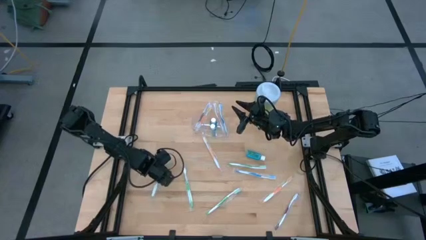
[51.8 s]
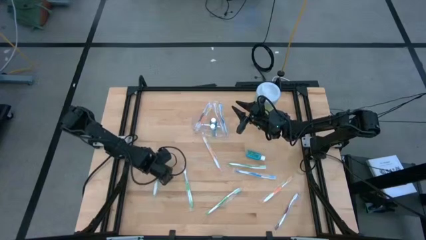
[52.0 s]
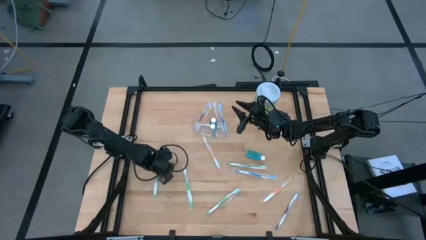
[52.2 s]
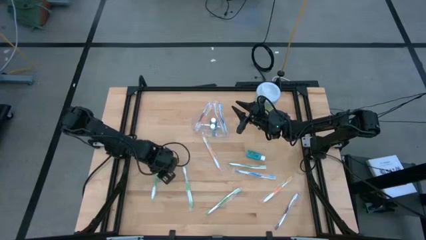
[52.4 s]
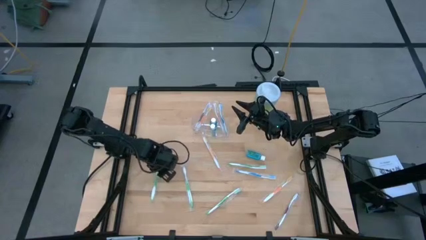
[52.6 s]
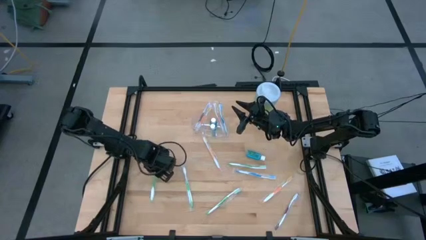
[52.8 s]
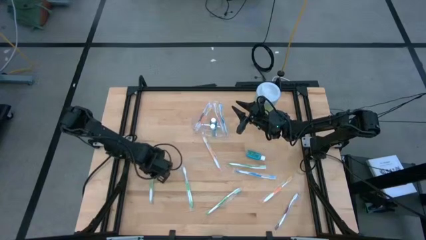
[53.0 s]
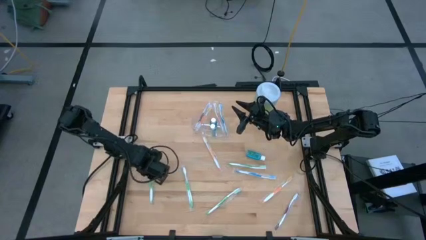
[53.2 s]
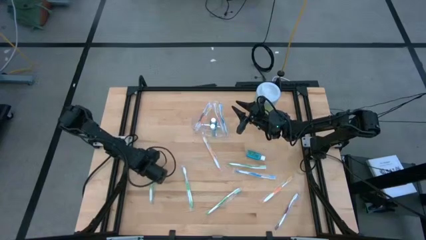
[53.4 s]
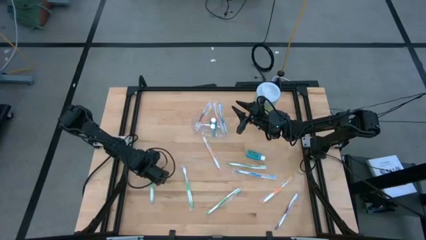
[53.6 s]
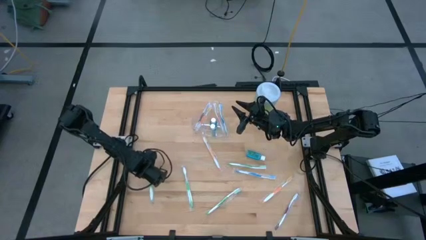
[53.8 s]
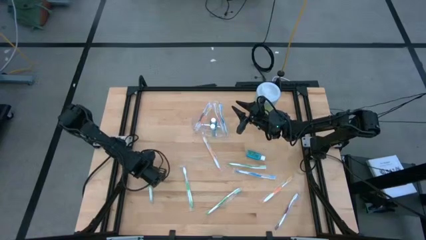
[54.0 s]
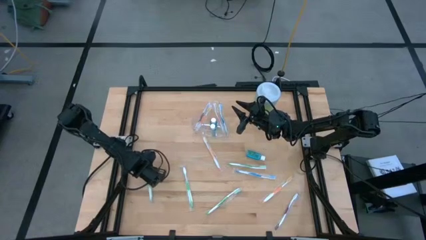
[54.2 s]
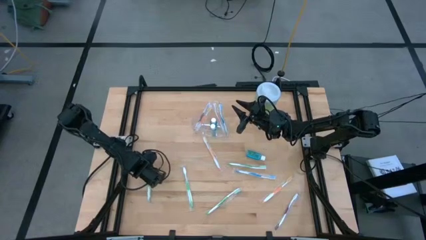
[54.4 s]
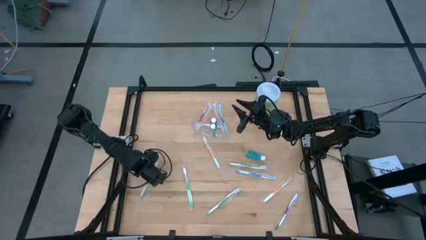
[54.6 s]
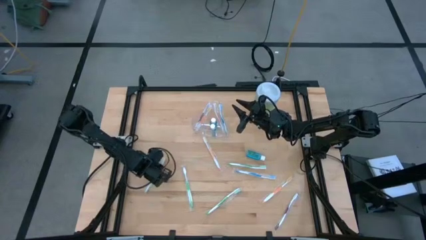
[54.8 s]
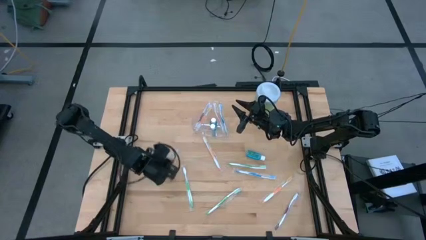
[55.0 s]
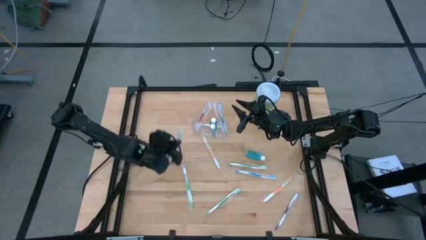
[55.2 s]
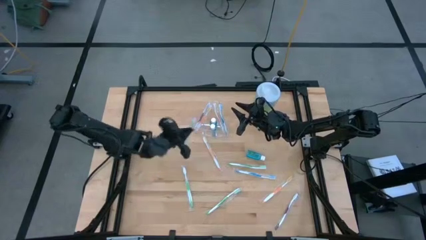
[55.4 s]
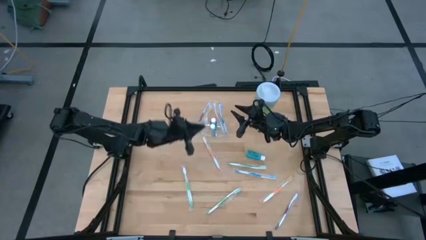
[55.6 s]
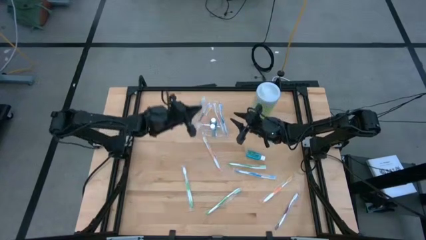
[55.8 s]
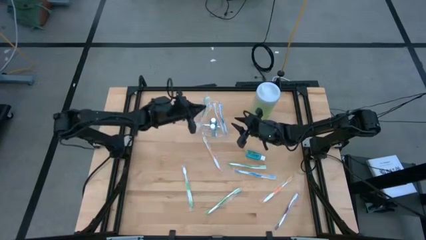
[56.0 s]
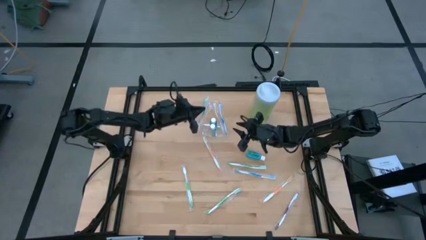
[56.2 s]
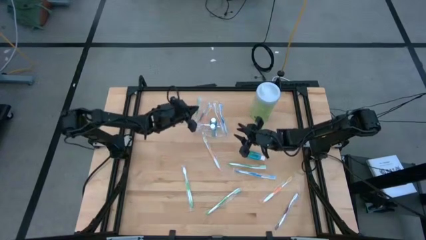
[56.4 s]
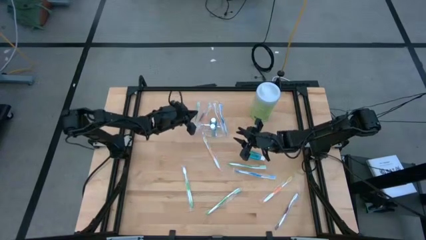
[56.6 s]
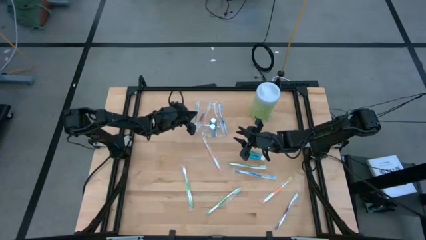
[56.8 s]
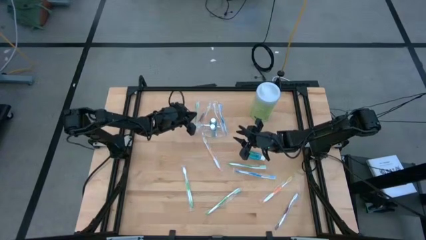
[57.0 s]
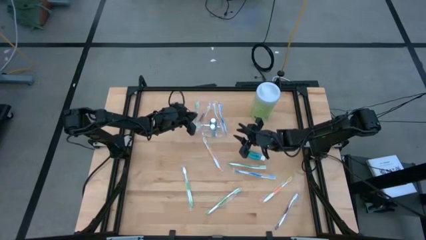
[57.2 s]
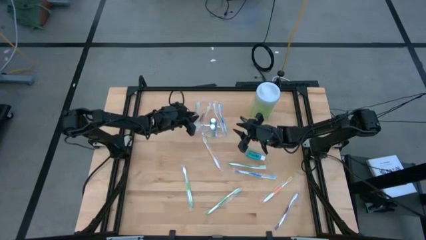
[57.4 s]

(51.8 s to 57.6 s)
Task: Pick & Place toothbrushing station
Put the green toothbrush into the transparent organizer

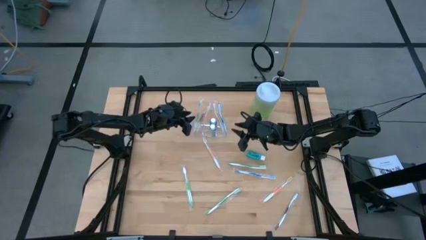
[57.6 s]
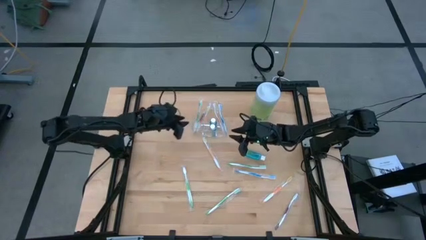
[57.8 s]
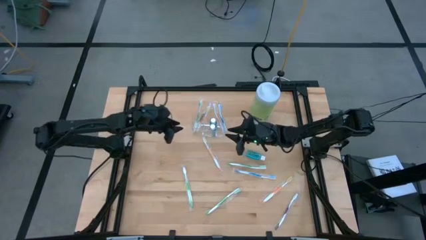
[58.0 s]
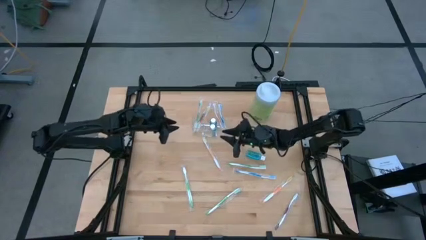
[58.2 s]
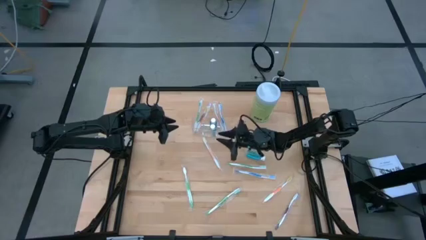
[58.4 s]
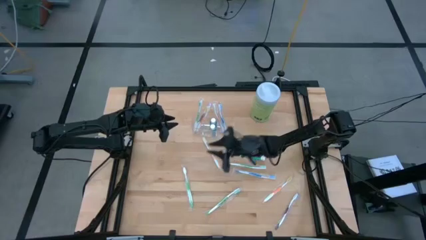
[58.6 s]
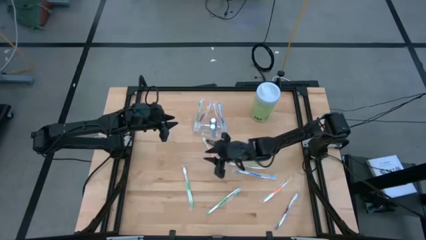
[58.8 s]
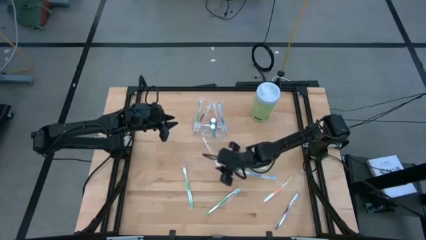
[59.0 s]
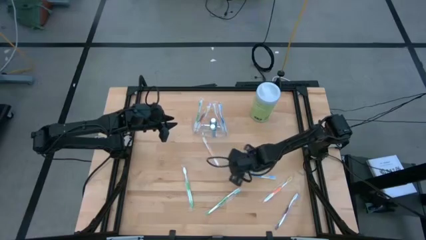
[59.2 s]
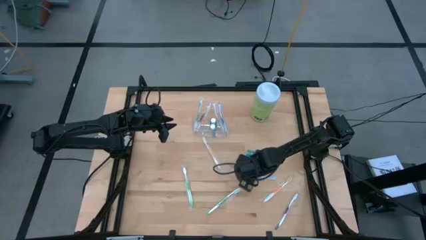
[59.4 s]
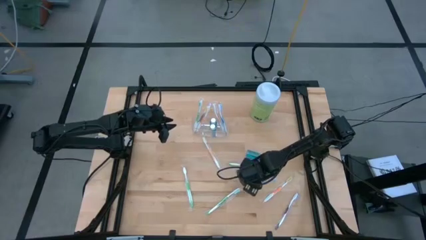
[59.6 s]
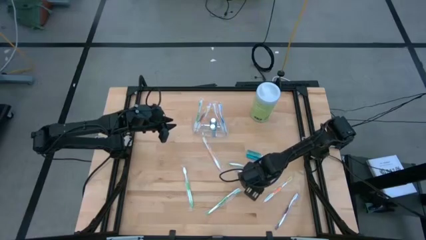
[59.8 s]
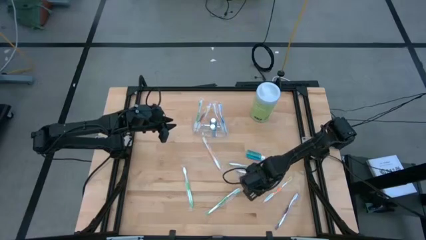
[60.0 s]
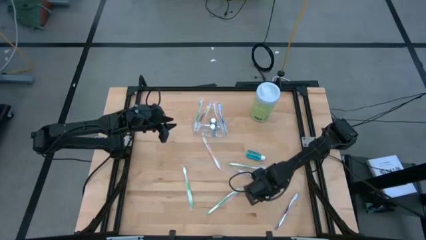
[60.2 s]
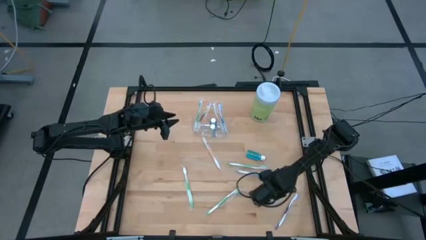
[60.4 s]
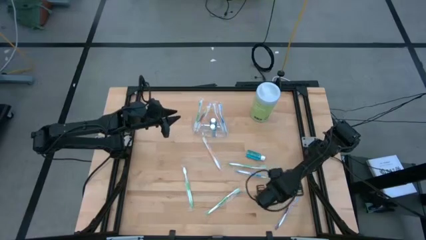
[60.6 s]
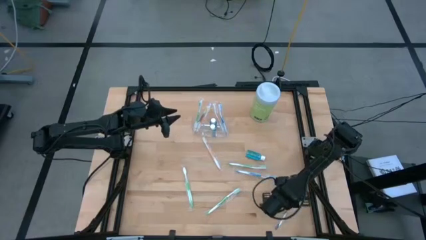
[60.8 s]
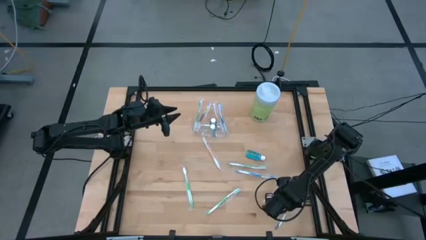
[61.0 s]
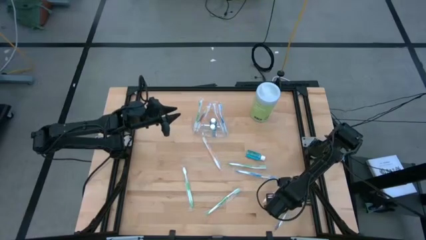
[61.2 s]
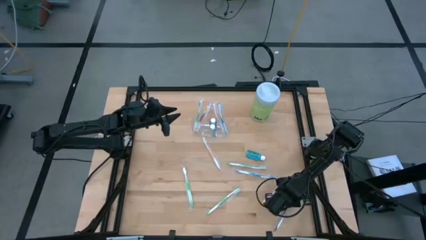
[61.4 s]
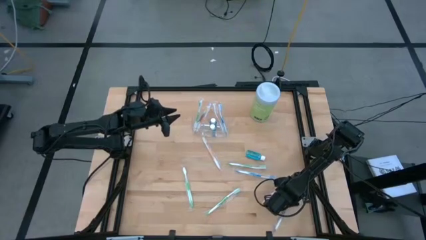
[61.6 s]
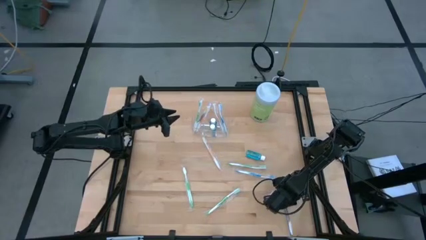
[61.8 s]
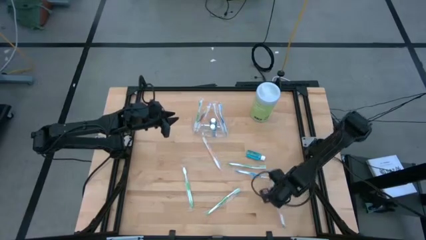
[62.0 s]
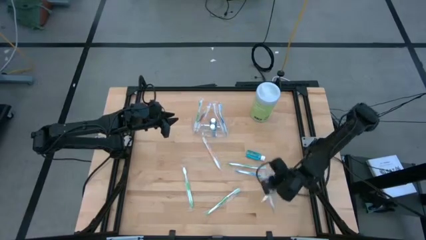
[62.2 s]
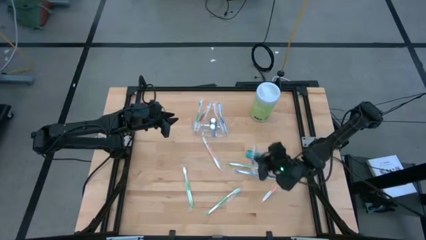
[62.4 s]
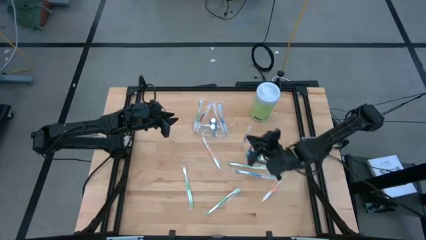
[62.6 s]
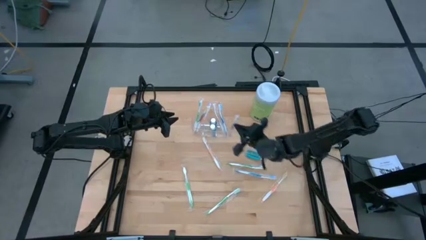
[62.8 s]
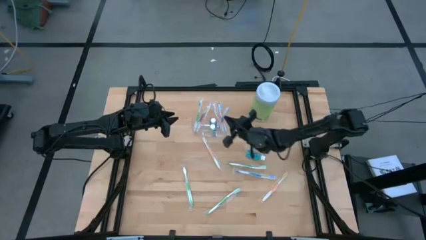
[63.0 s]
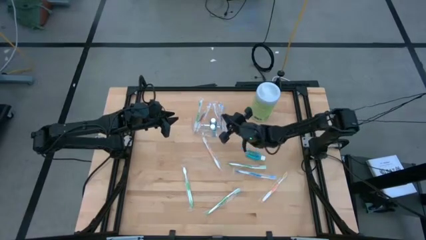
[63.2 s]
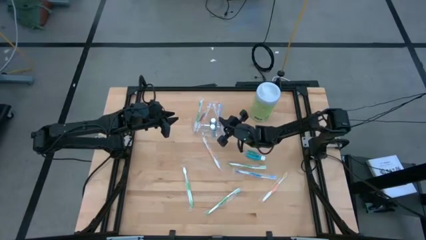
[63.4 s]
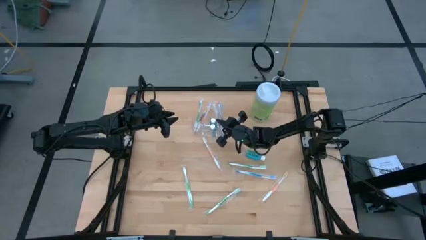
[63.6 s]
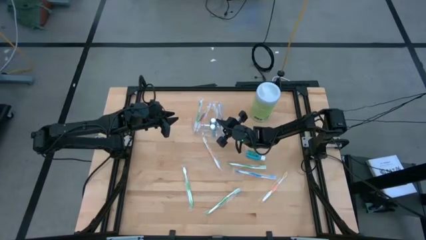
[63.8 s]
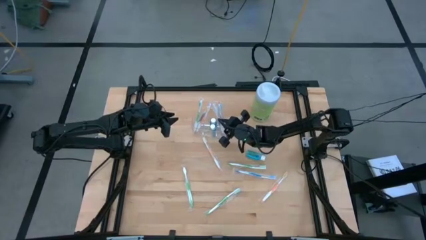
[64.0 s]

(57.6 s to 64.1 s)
Put the purple toothbrush into the transparent organizer

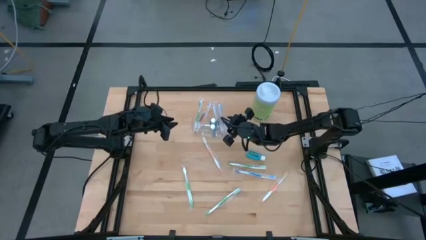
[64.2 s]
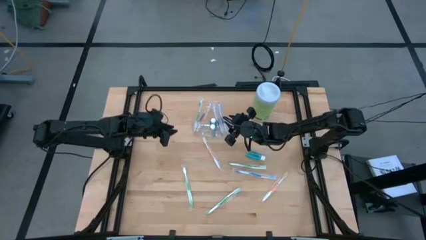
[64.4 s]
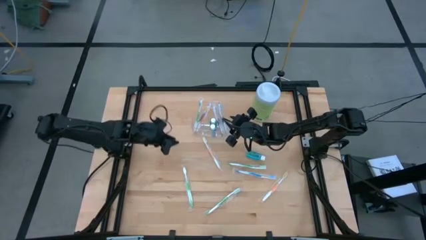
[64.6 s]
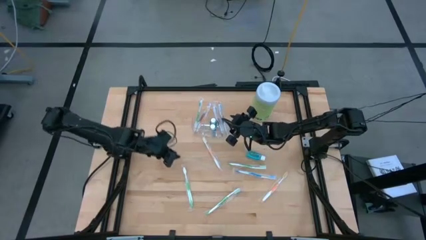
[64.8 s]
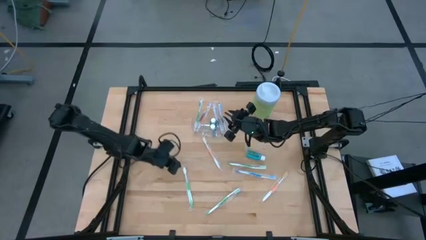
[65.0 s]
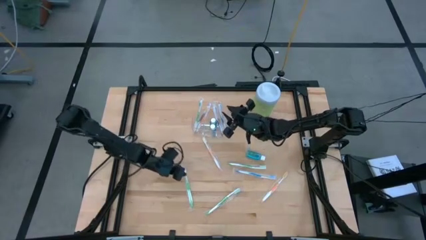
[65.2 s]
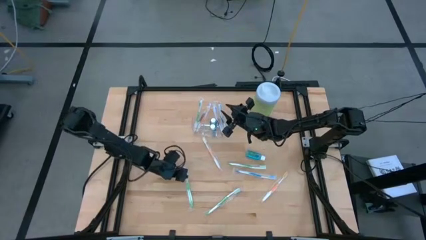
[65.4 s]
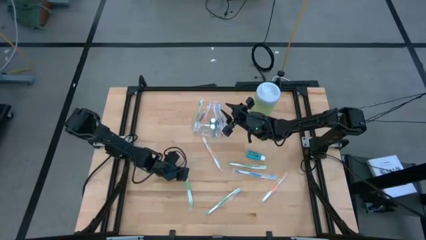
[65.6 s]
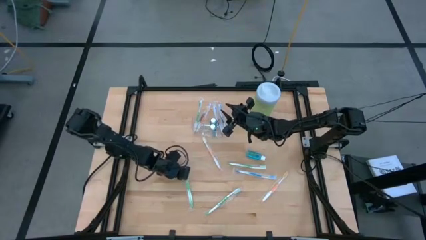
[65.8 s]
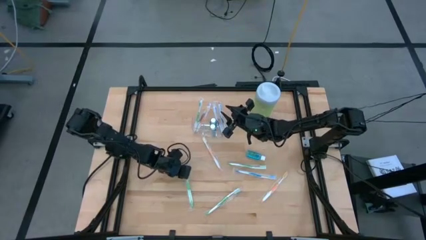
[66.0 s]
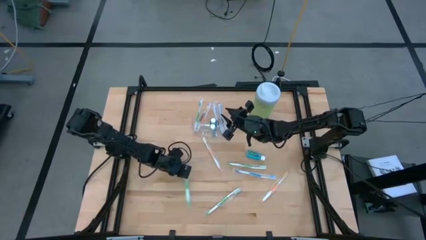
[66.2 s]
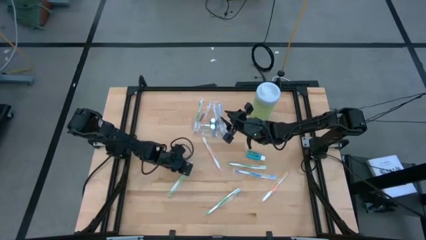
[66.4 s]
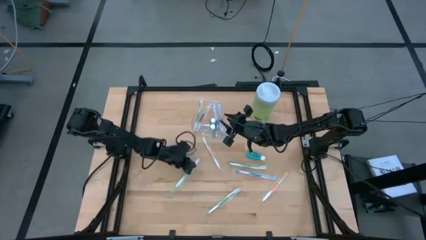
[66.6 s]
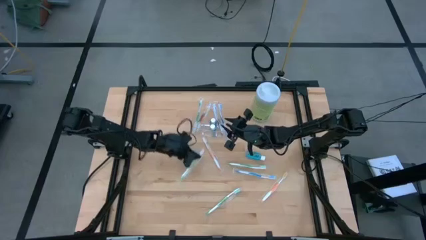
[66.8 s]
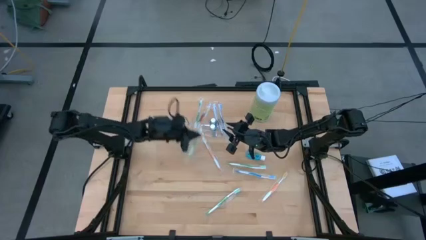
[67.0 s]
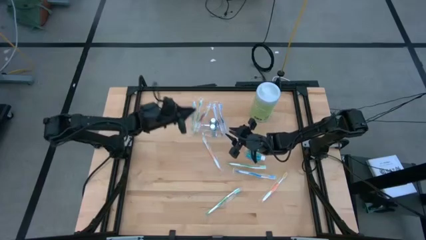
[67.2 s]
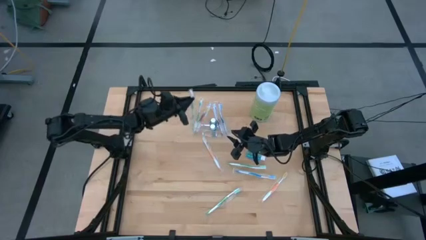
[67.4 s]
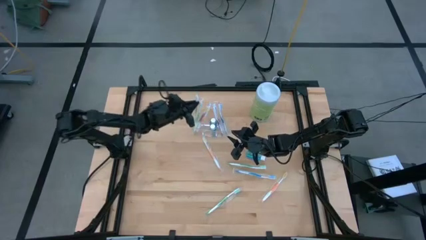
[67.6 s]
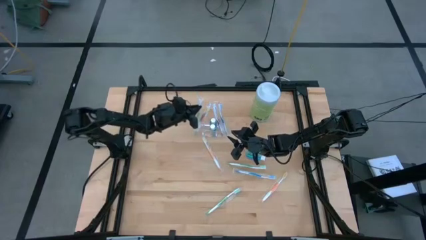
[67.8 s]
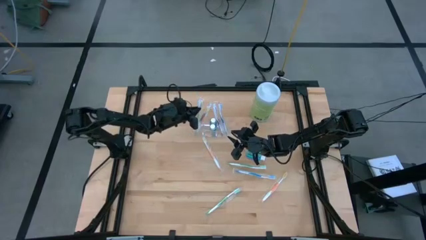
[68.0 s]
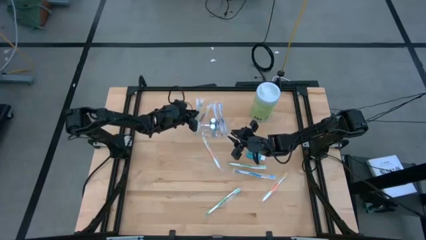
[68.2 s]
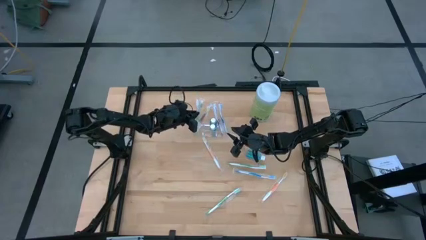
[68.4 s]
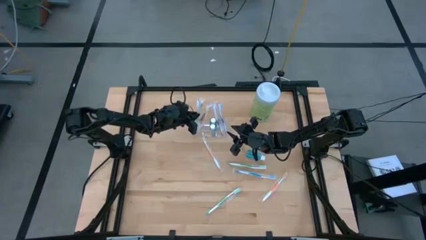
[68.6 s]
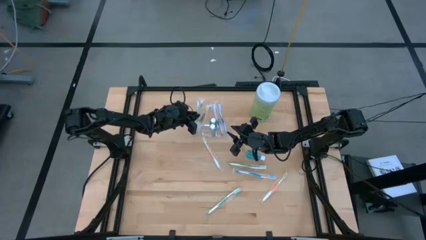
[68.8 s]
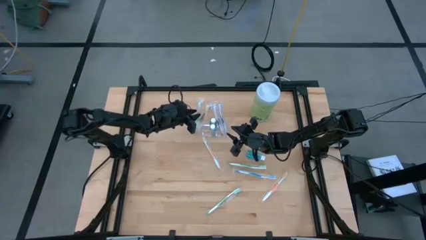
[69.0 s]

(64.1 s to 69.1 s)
Put the green toothbrush into the transparent organizer
